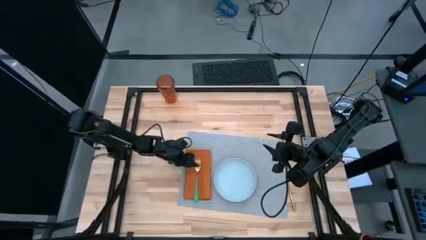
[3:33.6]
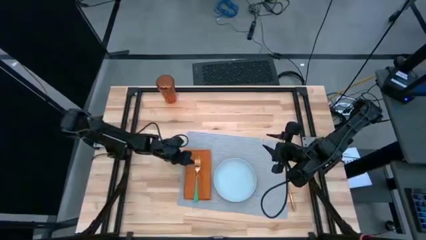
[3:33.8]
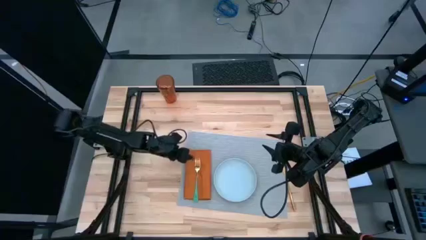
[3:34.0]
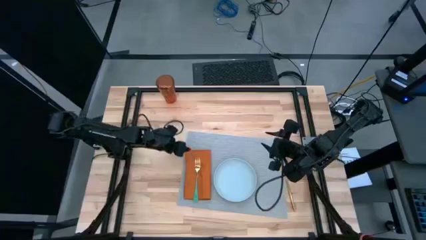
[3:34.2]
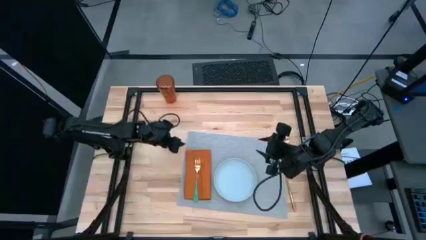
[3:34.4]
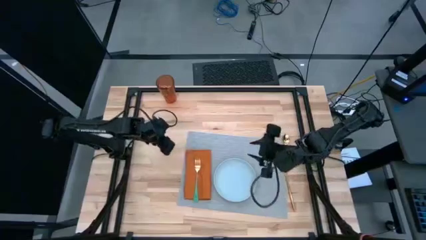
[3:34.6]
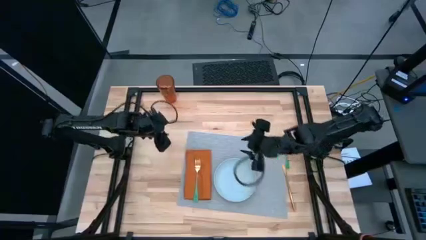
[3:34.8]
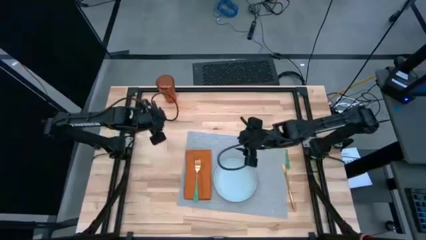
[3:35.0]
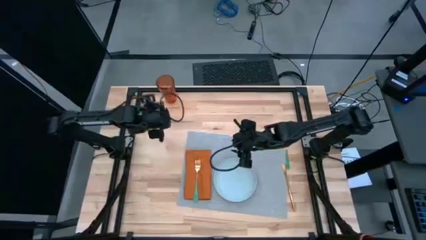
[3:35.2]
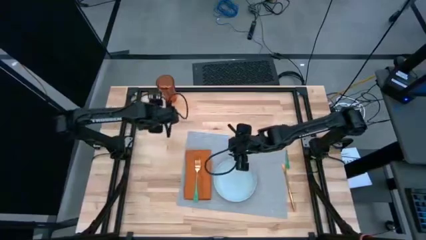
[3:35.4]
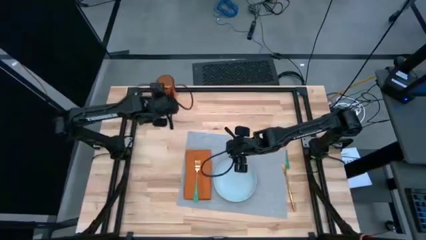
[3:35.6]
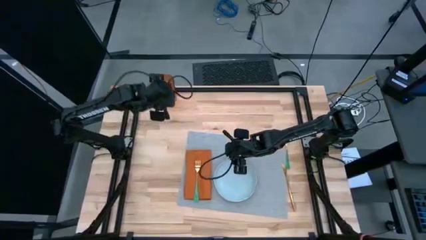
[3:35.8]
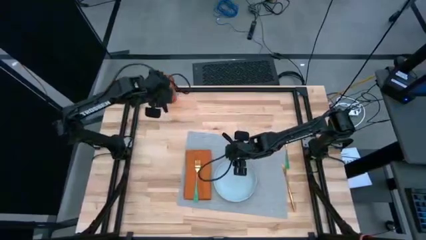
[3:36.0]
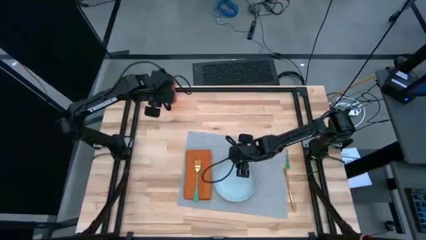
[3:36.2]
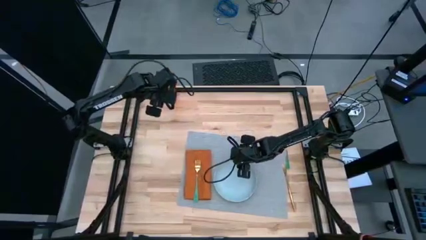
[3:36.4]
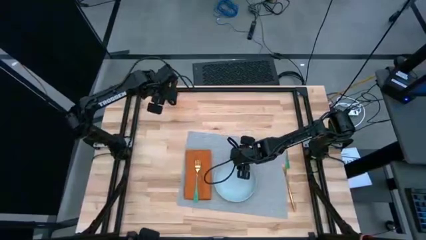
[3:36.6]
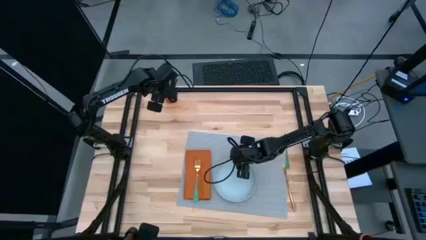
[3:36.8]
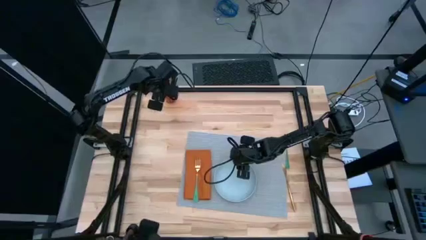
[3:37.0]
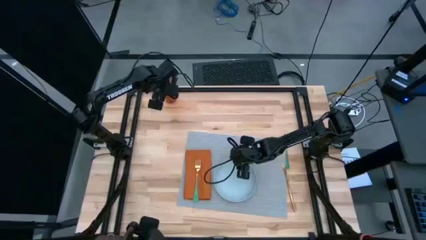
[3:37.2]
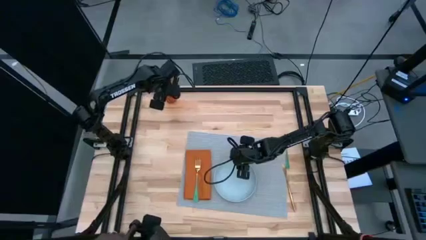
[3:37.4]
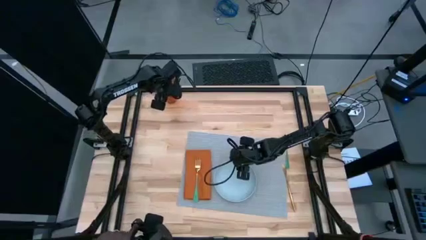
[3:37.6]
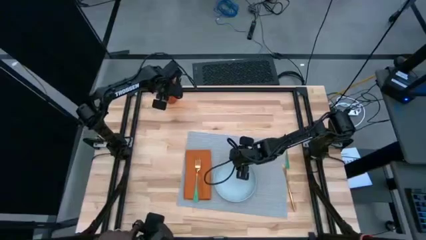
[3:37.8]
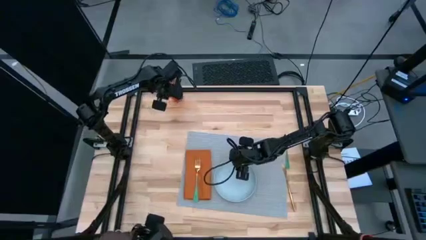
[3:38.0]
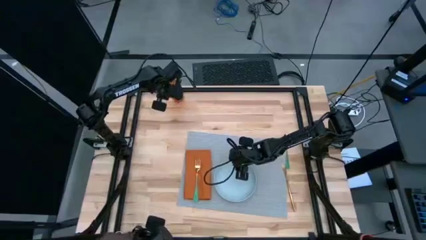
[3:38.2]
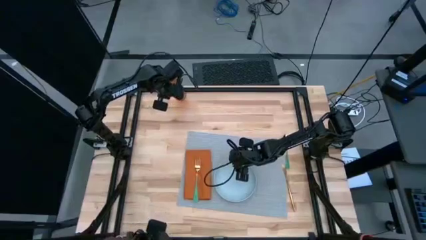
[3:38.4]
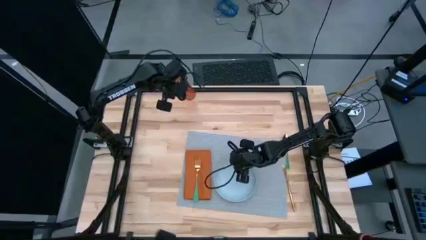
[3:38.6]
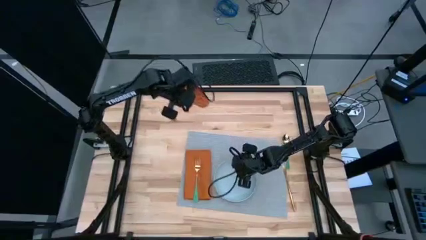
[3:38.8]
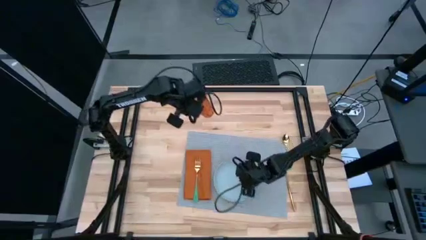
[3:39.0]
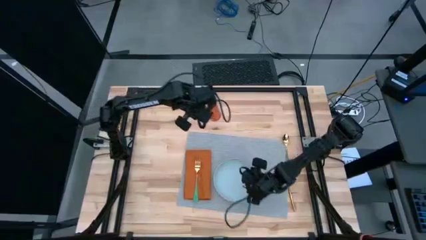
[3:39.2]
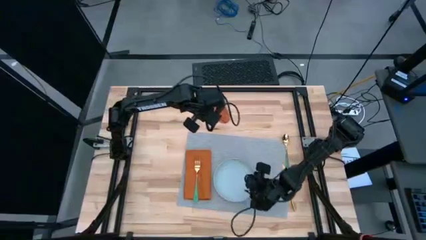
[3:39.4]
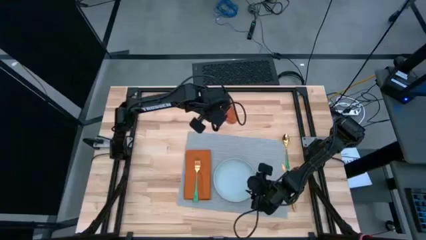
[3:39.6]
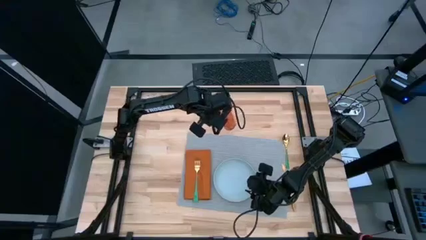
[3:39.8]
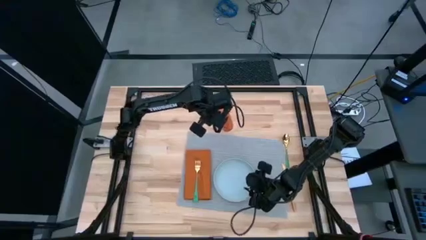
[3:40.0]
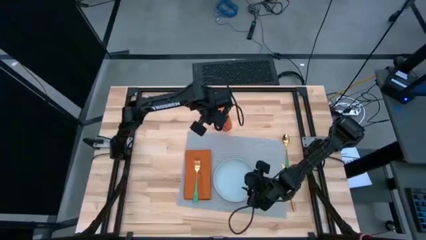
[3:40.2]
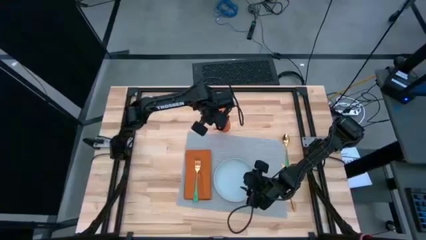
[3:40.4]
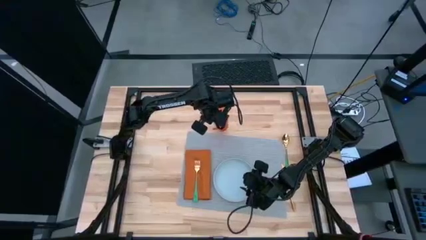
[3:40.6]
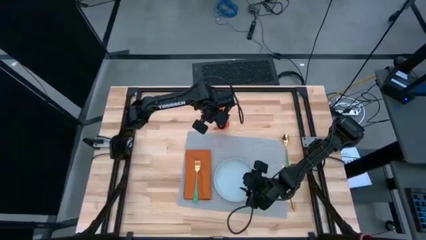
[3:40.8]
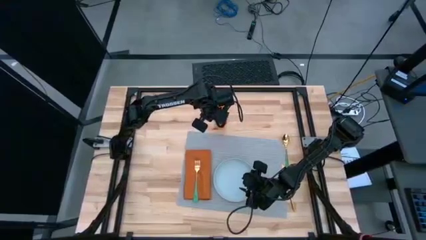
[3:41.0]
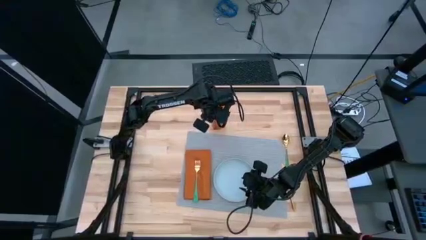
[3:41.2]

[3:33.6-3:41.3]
Task: Set table place
Move the brown cup

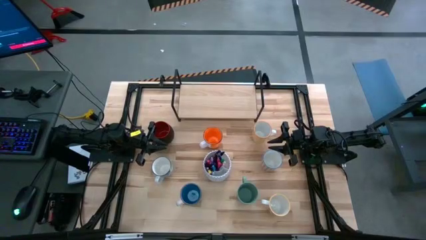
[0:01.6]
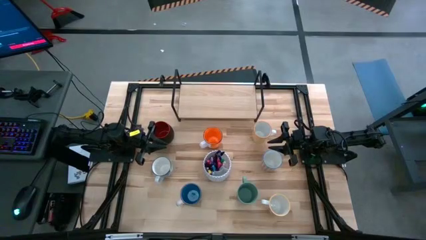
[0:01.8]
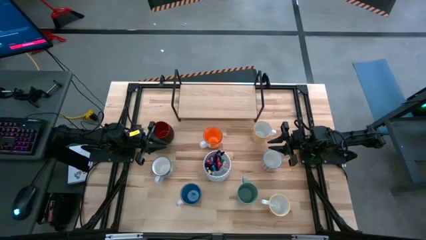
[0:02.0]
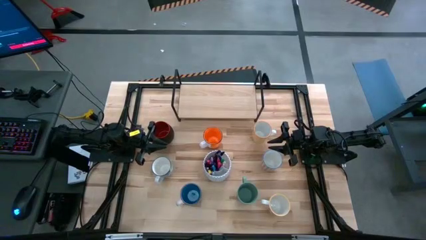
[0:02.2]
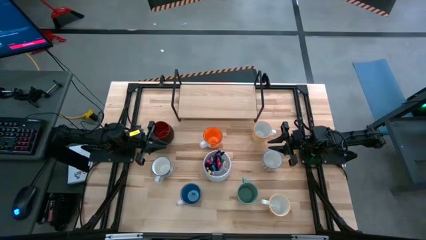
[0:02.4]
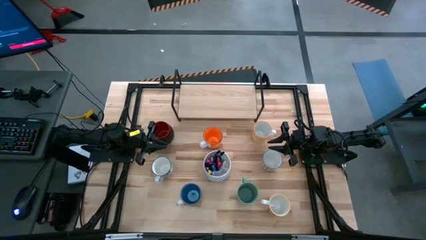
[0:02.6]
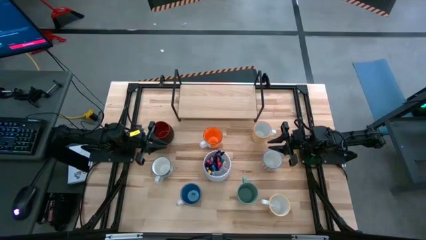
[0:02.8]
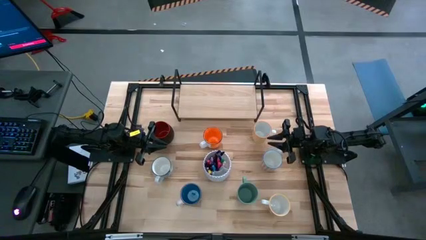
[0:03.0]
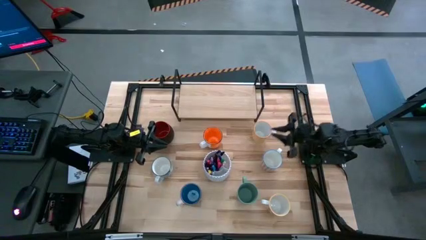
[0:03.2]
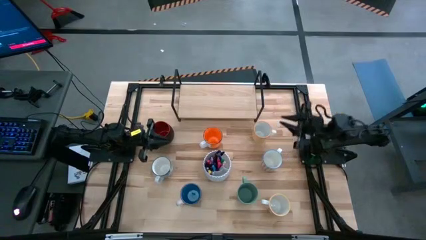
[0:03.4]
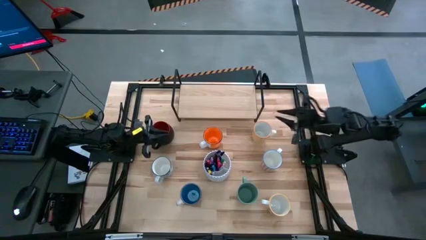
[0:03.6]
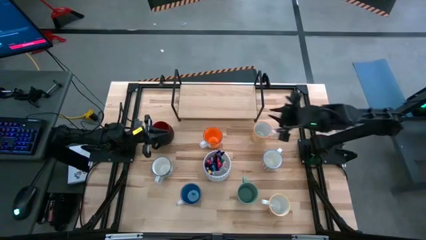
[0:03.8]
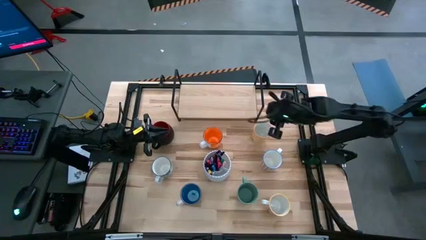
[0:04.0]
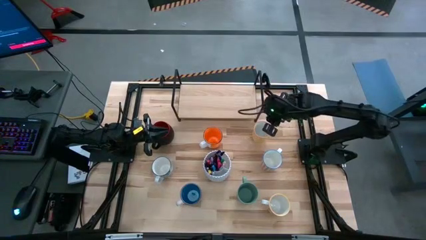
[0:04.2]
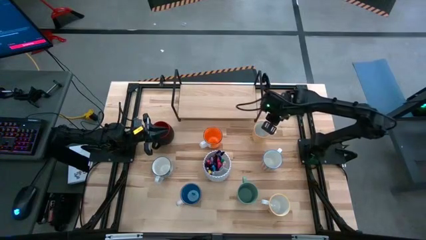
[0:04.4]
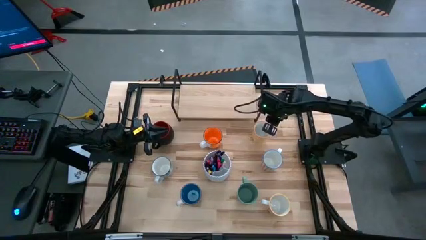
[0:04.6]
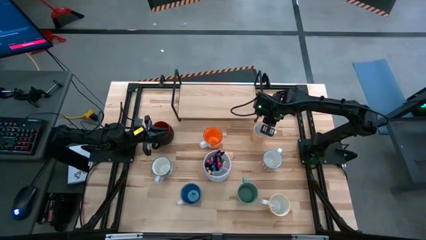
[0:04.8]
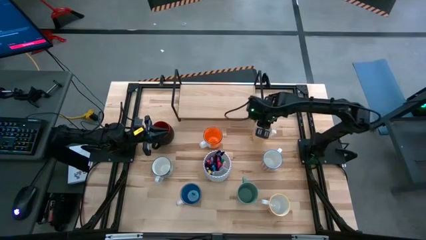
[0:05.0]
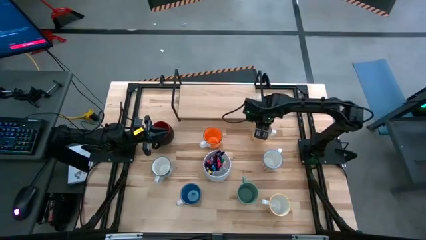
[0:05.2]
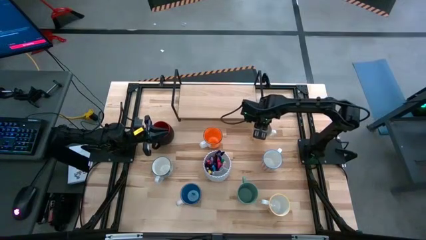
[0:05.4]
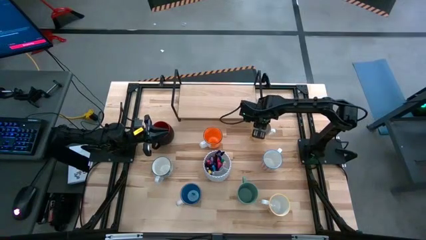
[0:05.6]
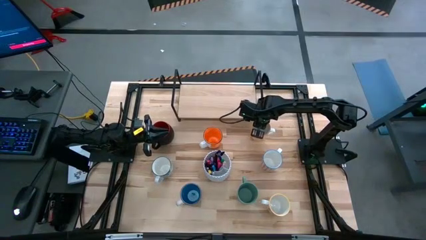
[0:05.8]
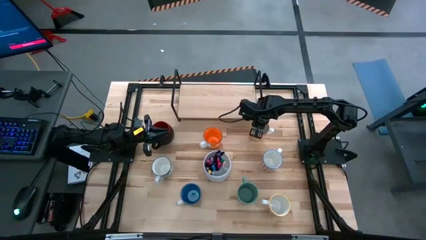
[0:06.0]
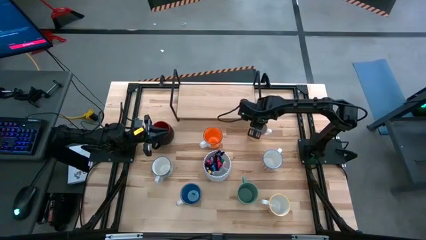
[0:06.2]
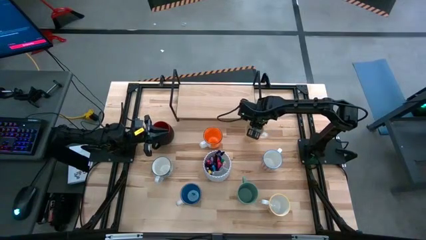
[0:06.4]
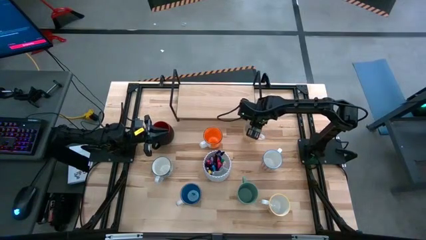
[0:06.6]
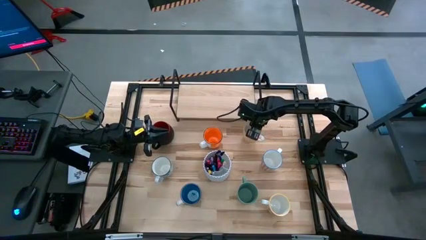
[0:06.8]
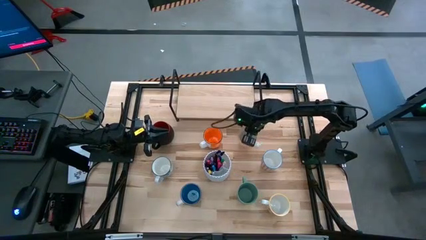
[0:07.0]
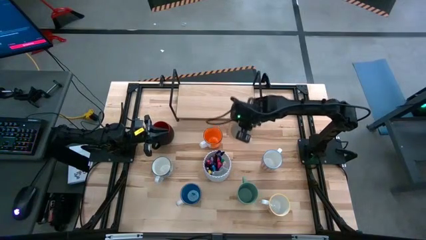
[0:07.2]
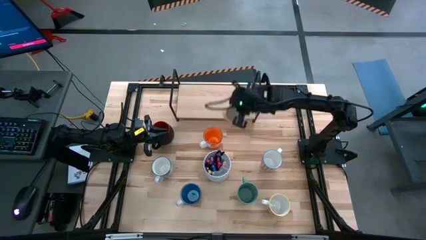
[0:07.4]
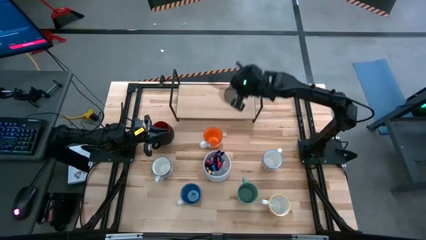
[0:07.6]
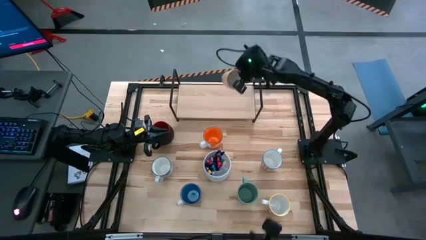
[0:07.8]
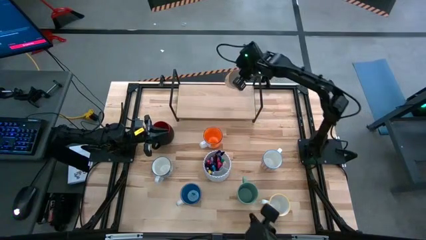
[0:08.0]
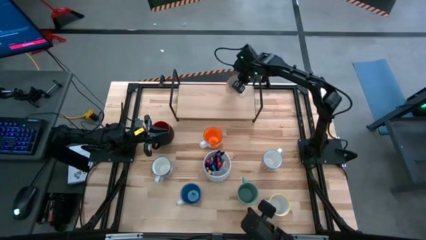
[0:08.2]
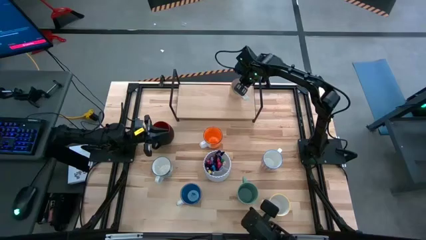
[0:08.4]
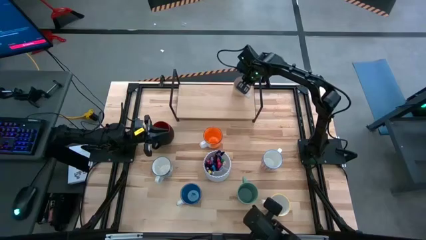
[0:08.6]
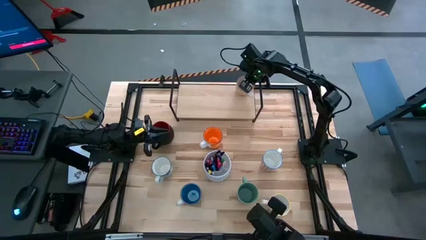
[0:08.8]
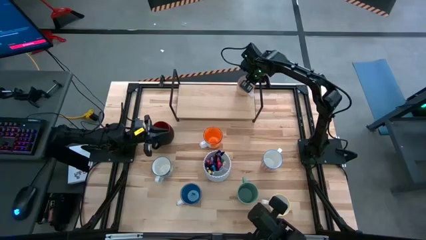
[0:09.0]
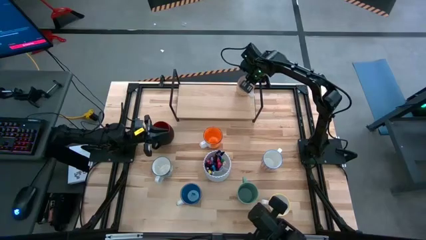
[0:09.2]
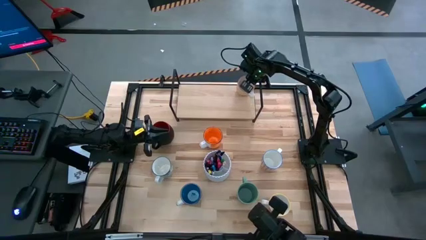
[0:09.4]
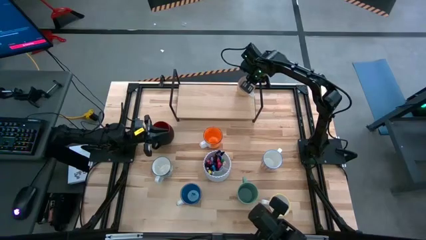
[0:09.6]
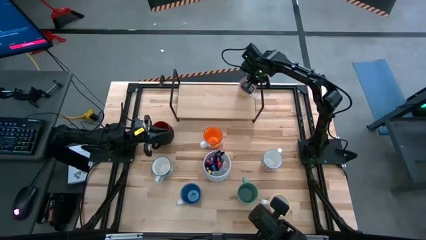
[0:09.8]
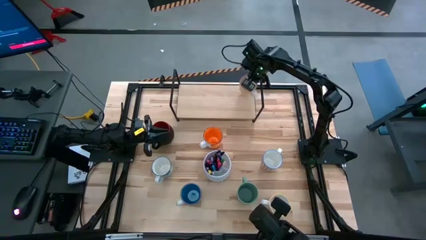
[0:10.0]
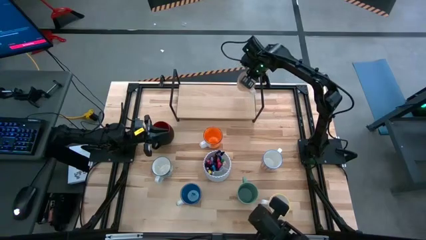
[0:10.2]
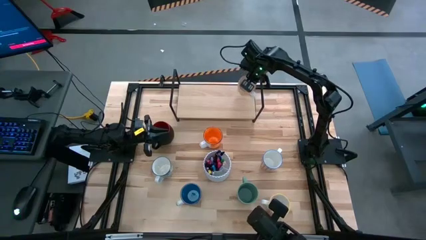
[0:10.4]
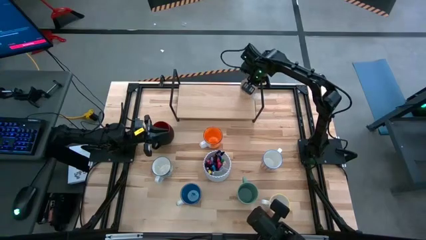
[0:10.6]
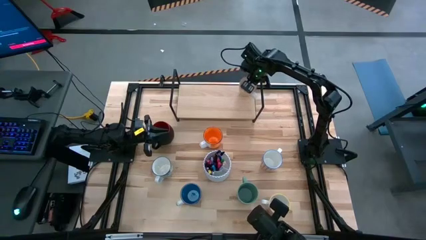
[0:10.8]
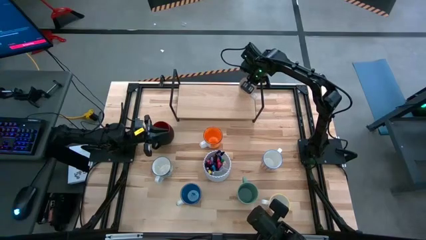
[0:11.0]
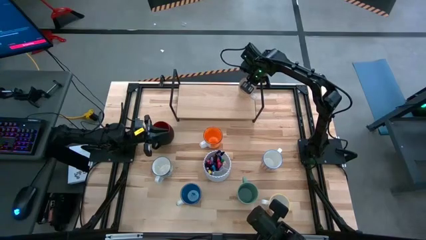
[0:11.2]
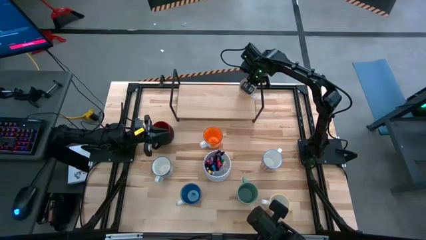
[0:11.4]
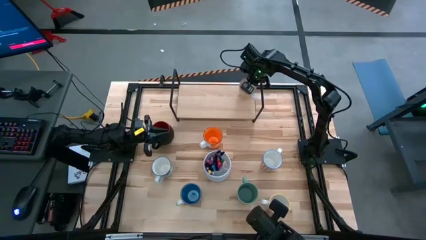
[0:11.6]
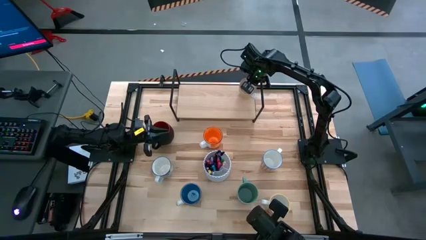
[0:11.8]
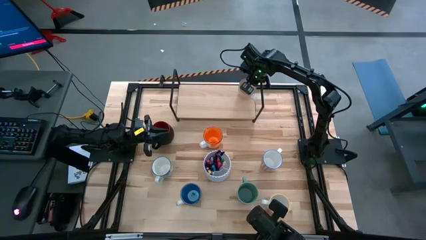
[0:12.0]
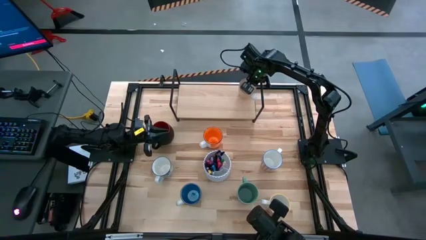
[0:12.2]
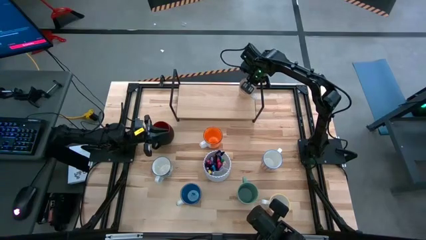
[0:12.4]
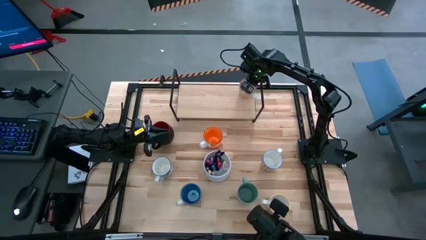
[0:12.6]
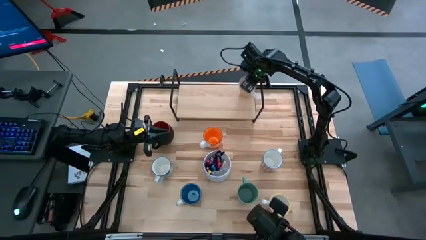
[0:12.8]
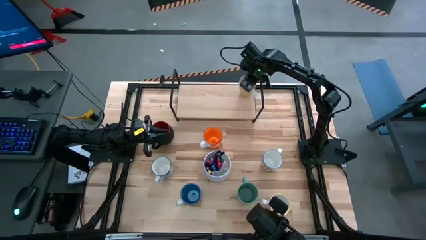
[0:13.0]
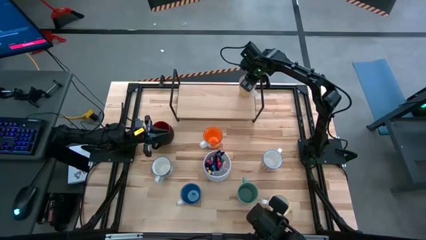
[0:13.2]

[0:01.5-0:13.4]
Task: Place coffee mugs
Put the yellow pattern mug on the shelf
